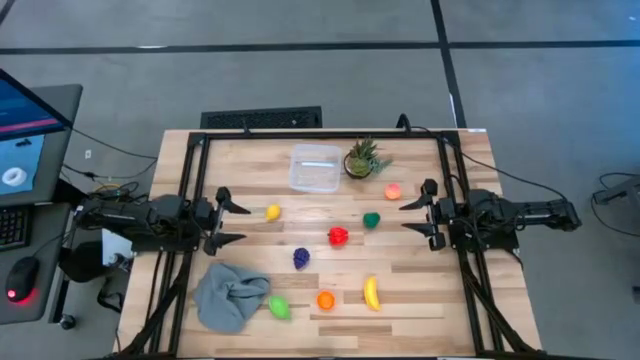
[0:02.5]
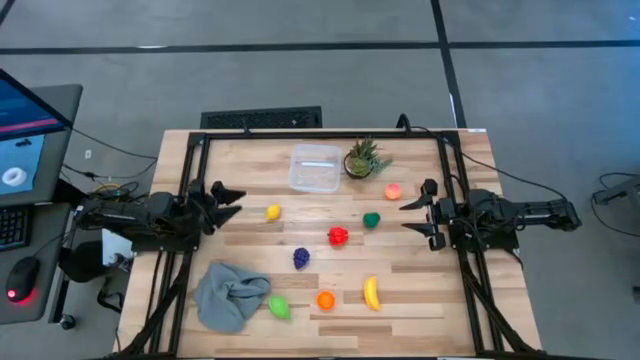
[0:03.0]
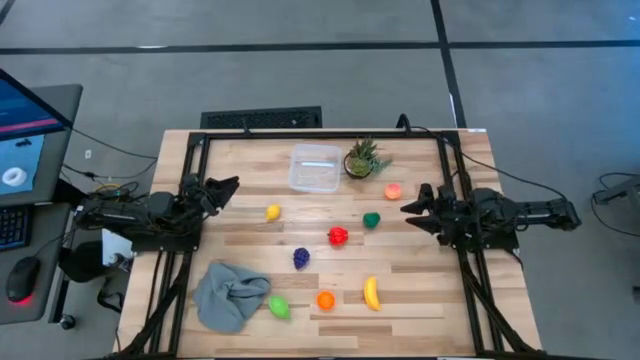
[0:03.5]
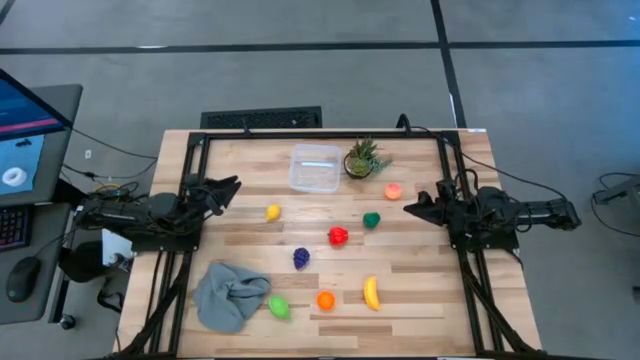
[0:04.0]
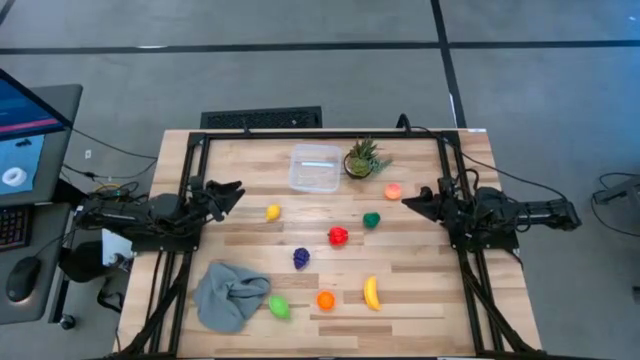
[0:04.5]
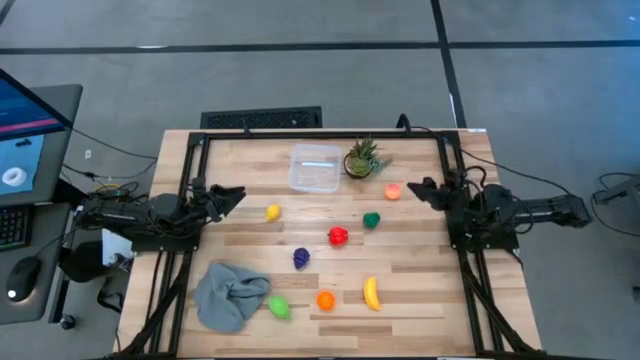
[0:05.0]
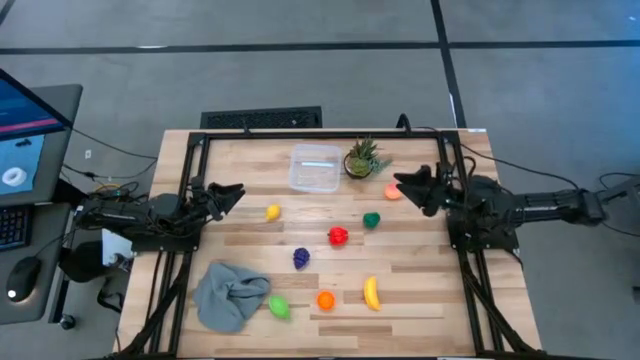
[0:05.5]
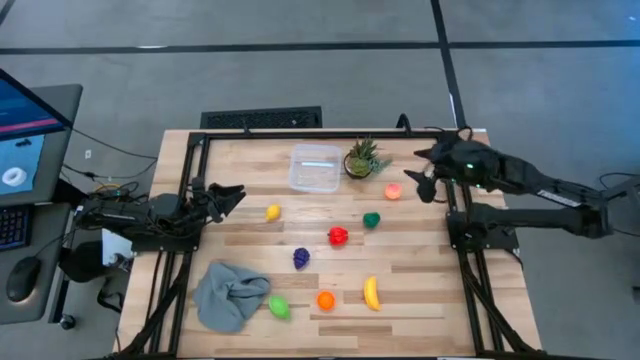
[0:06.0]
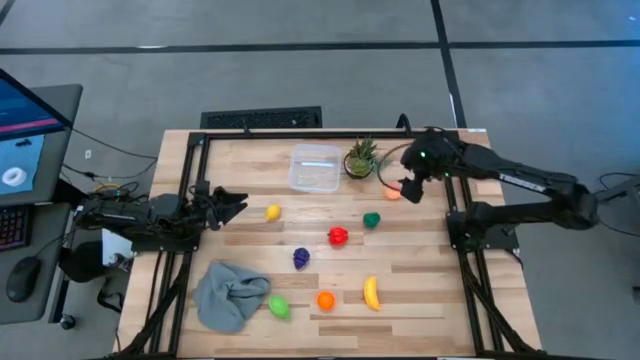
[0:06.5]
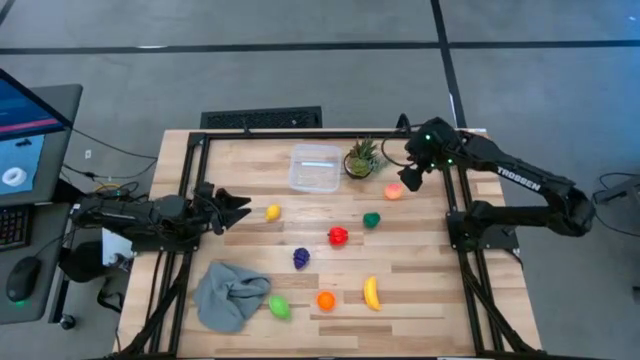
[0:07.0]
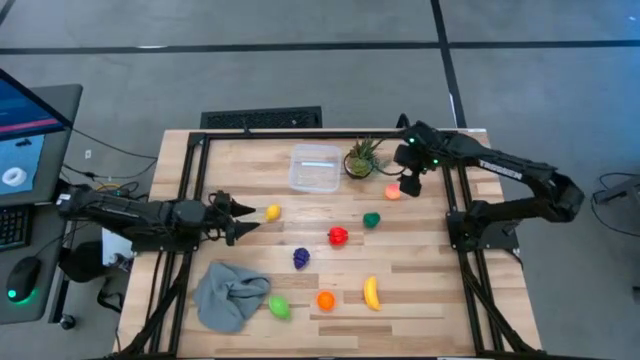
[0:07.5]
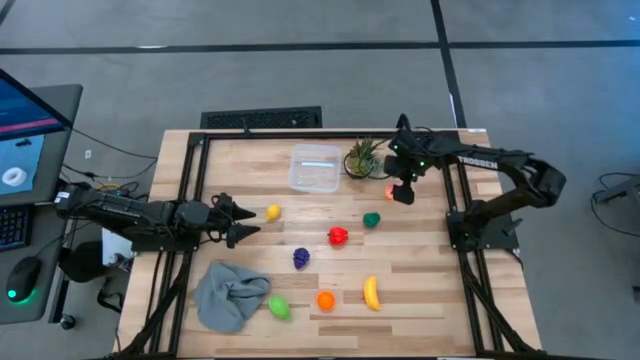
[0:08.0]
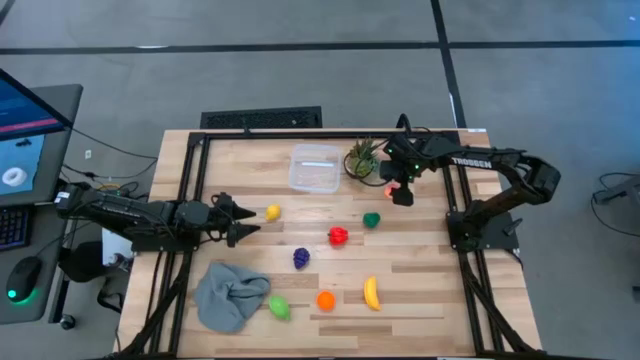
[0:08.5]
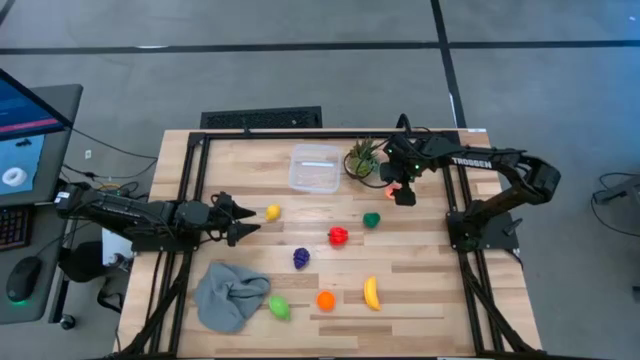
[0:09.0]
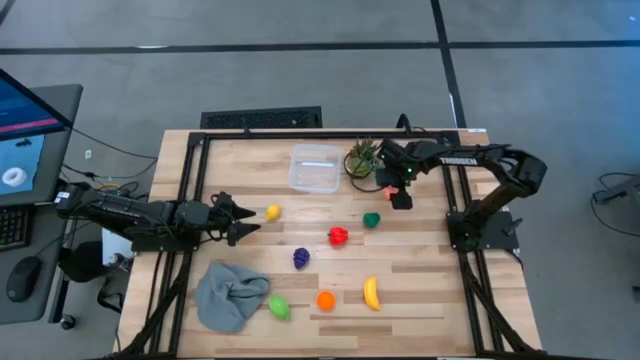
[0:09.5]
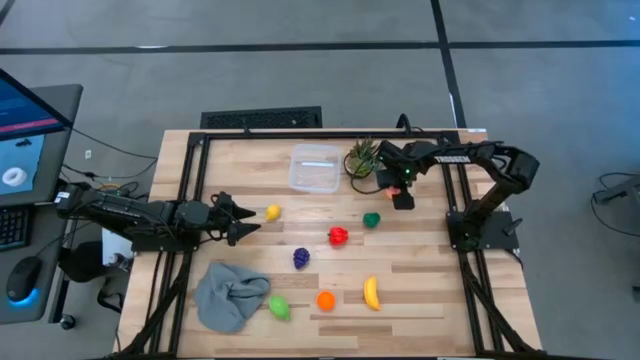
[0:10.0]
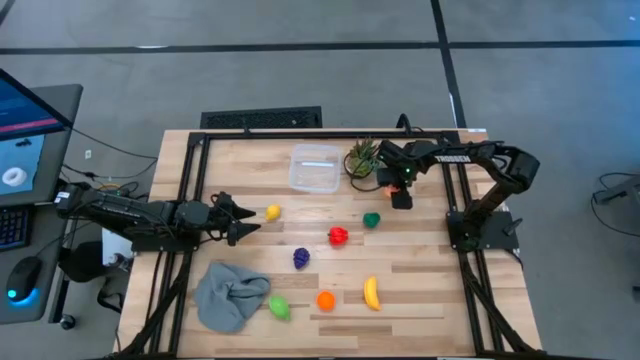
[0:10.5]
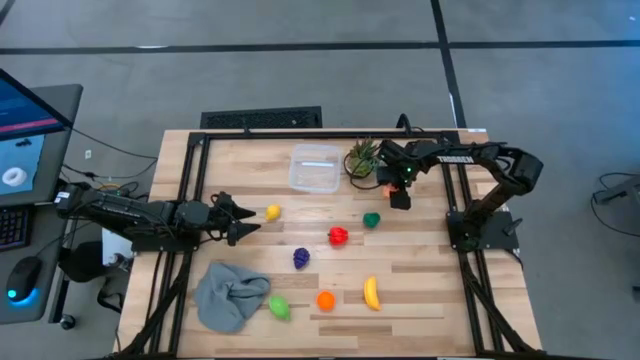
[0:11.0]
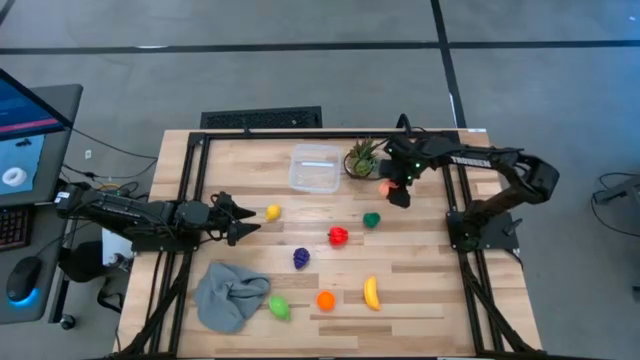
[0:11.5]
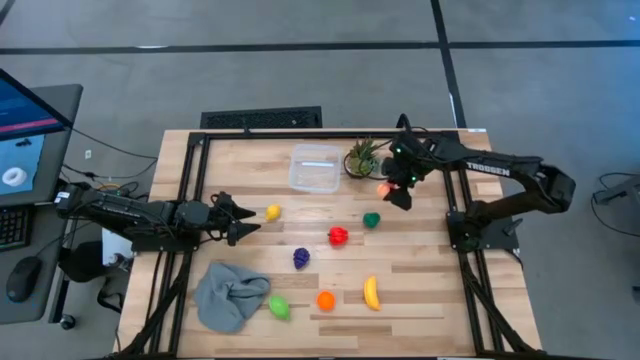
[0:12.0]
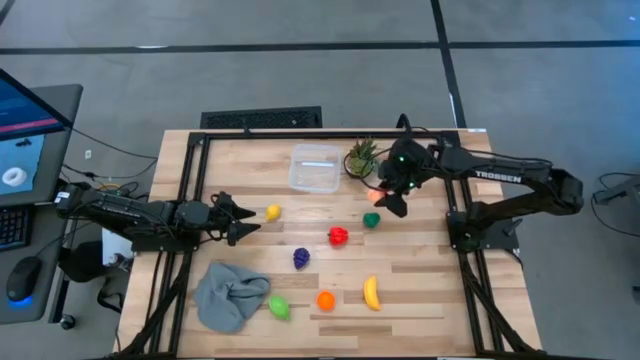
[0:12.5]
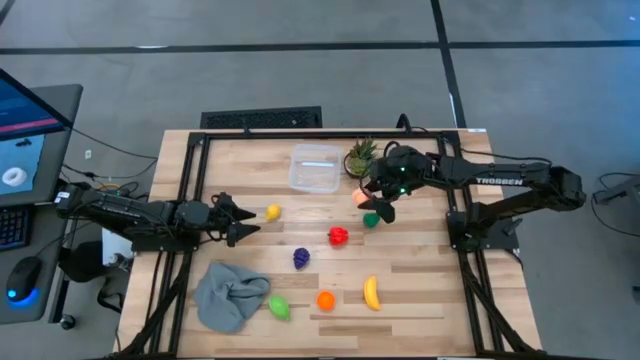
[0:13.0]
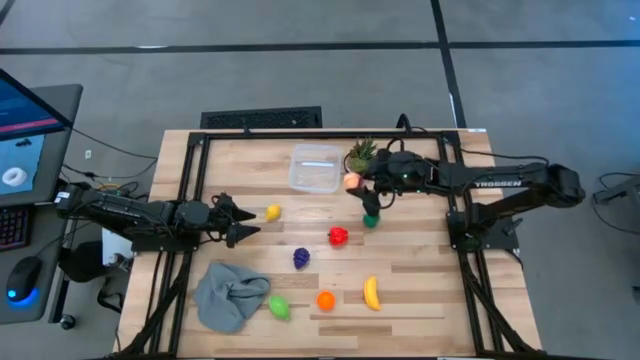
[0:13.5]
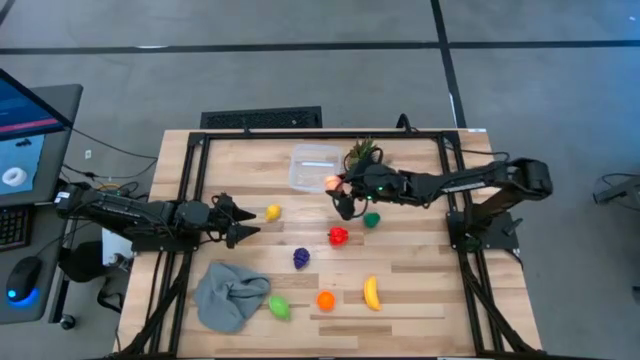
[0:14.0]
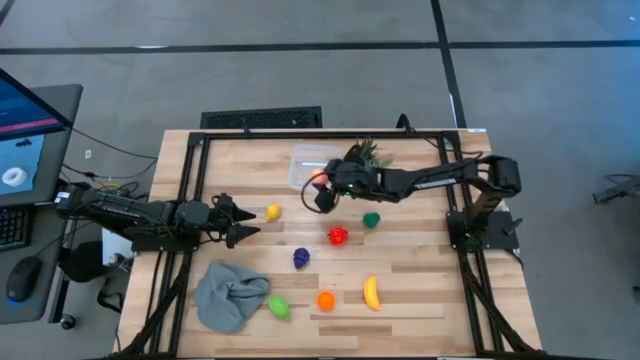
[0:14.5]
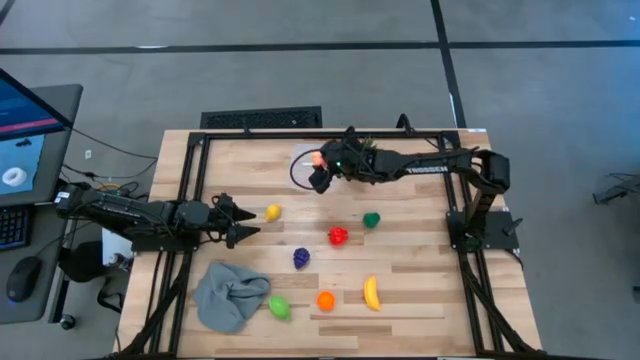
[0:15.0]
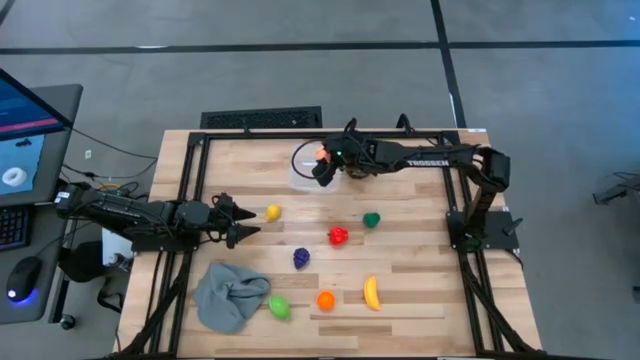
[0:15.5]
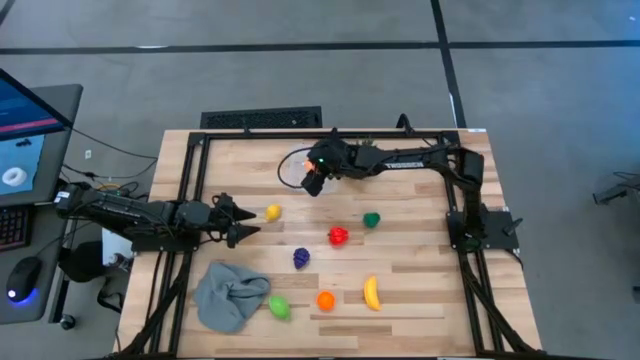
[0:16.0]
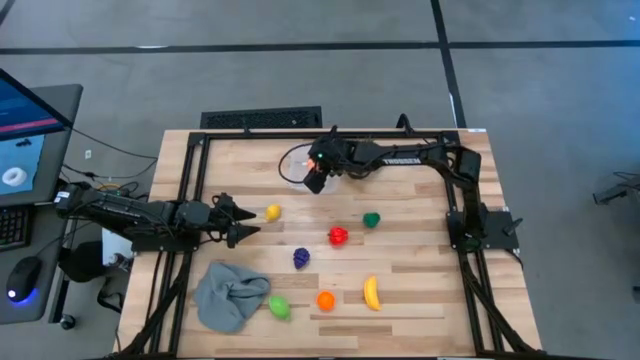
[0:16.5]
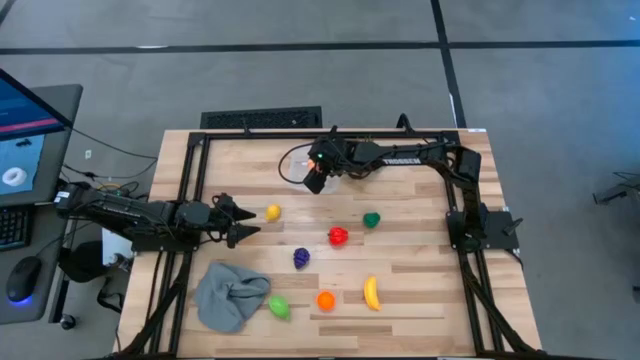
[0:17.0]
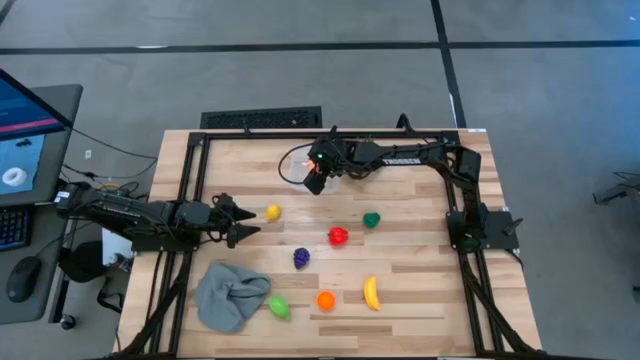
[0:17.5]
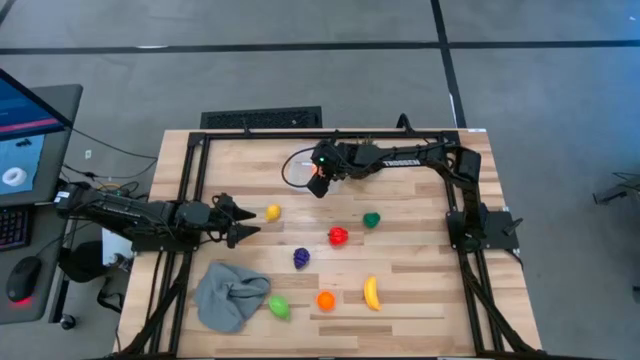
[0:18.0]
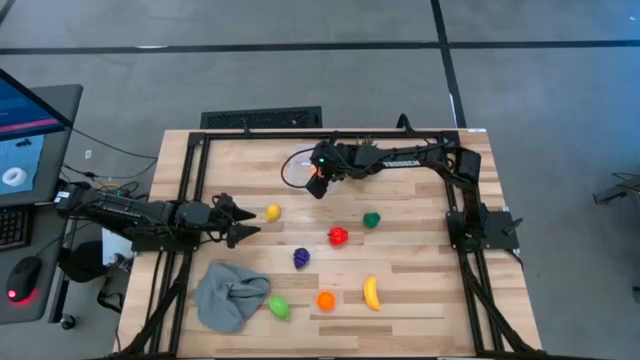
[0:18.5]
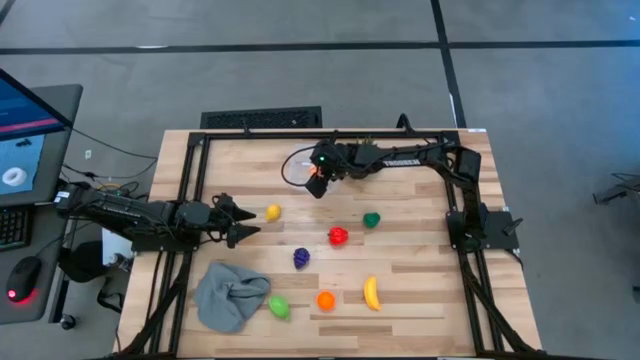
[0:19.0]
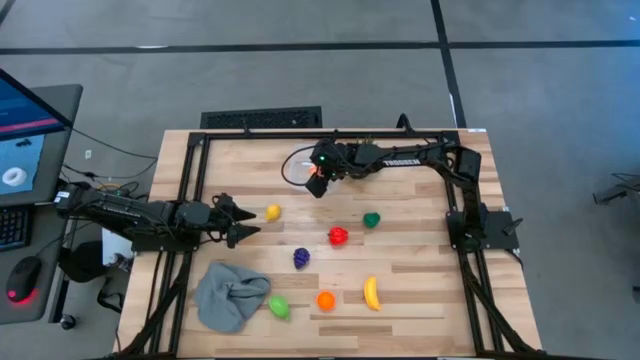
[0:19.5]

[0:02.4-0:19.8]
Task: Pick and placing Produce into tupperware
Put the pink peach into the transparent container
